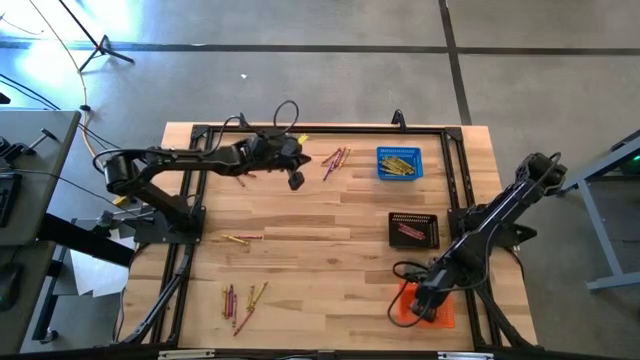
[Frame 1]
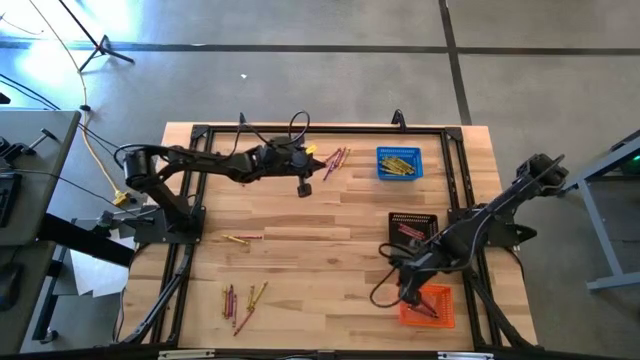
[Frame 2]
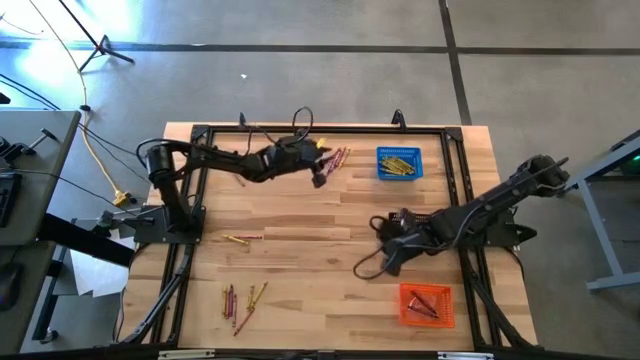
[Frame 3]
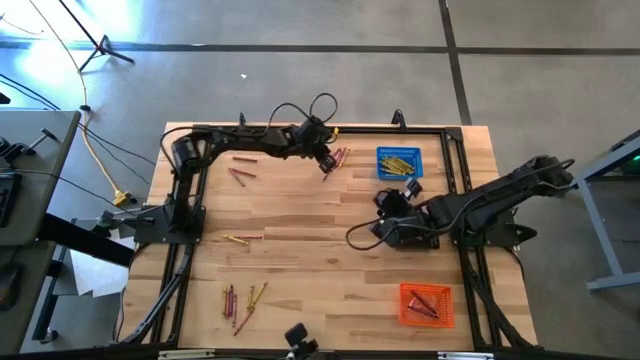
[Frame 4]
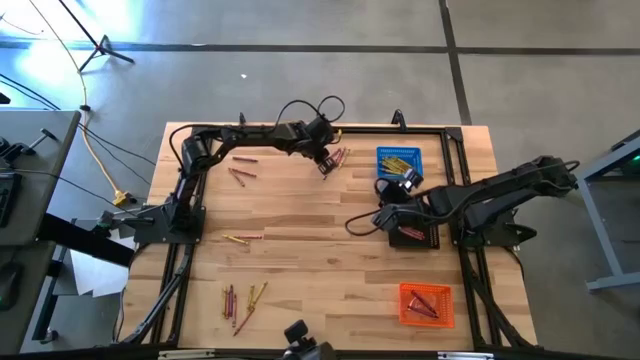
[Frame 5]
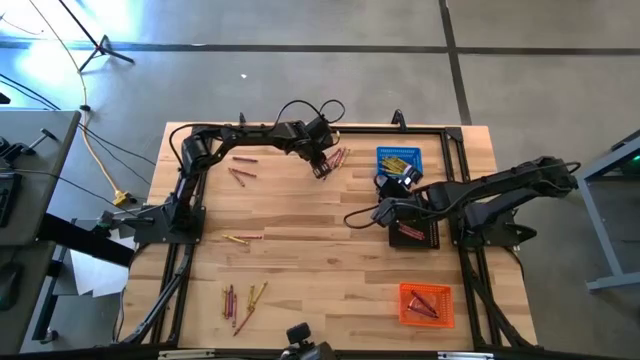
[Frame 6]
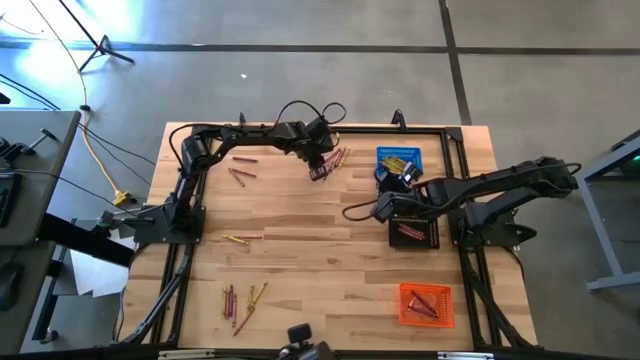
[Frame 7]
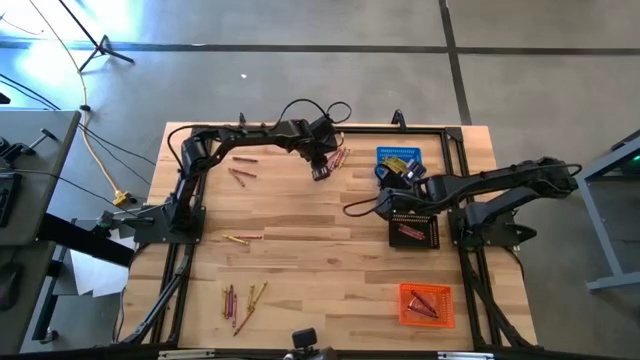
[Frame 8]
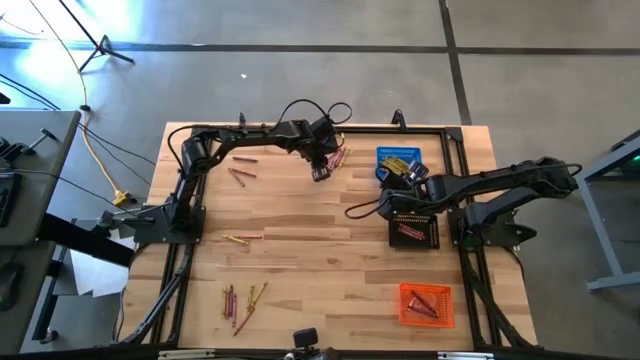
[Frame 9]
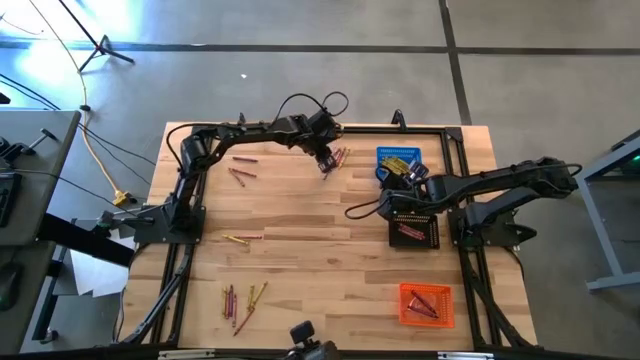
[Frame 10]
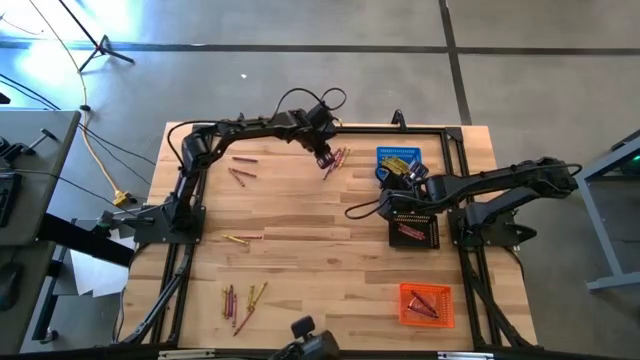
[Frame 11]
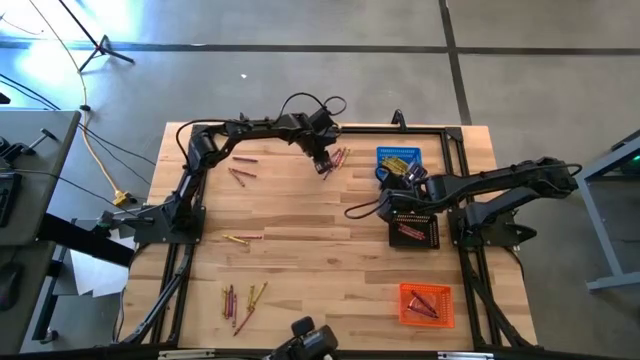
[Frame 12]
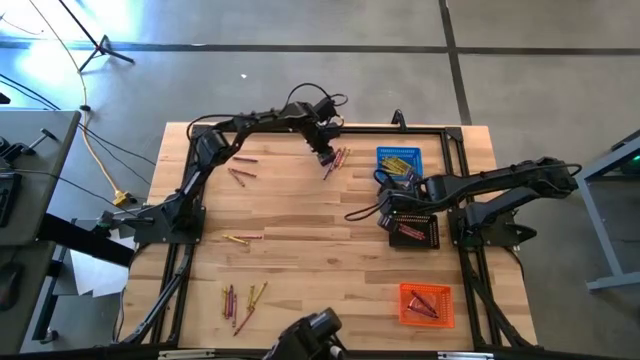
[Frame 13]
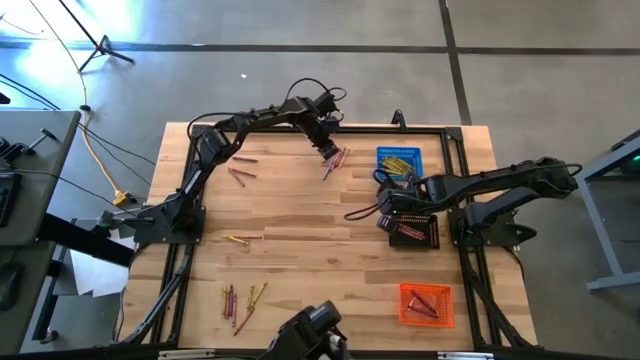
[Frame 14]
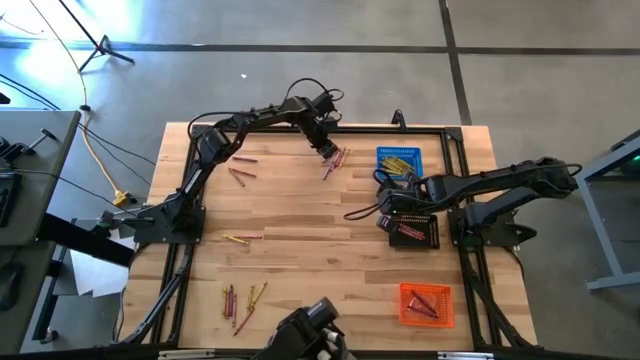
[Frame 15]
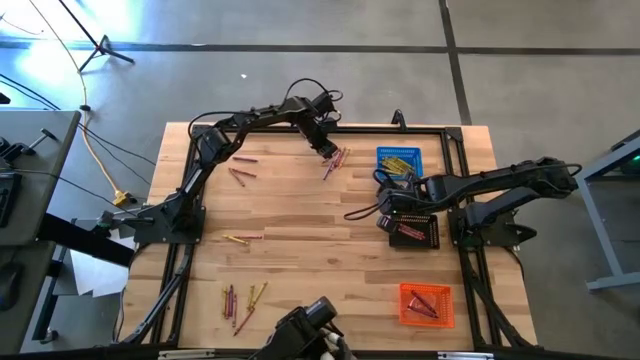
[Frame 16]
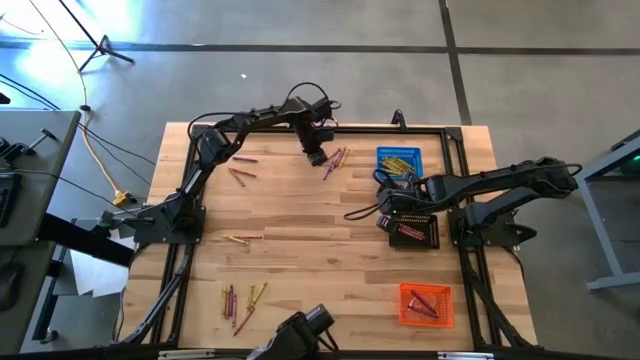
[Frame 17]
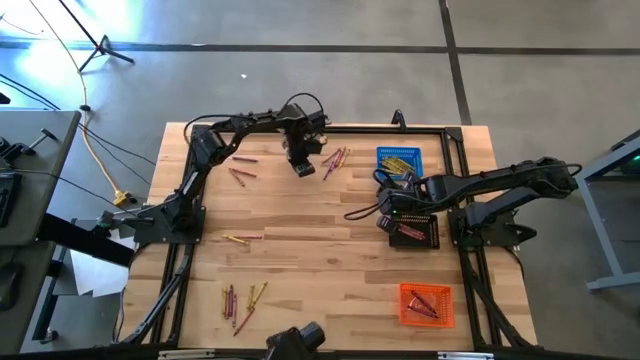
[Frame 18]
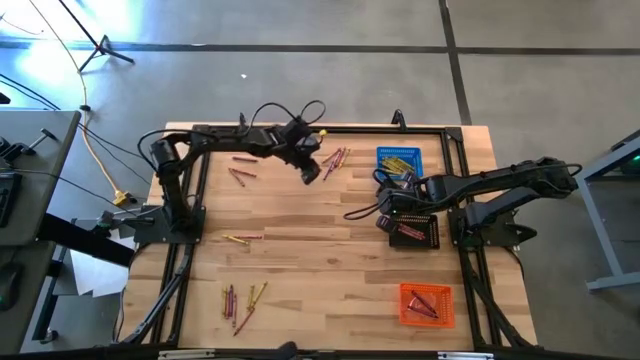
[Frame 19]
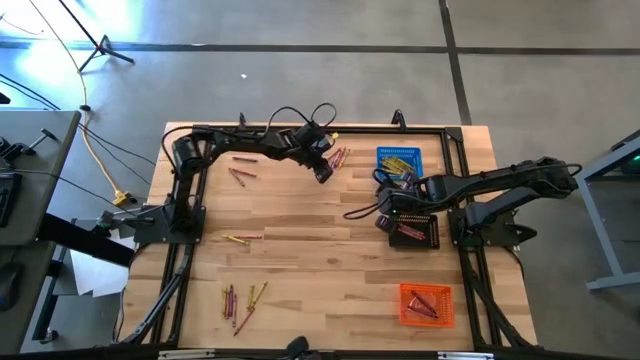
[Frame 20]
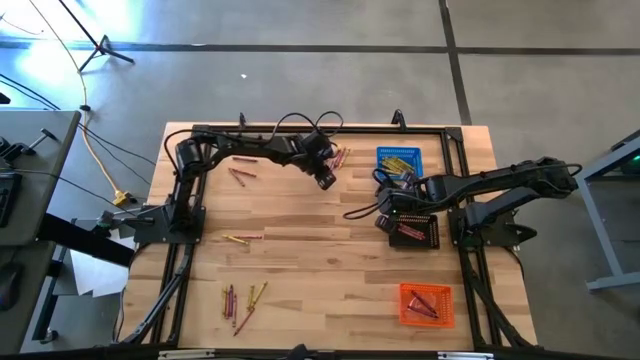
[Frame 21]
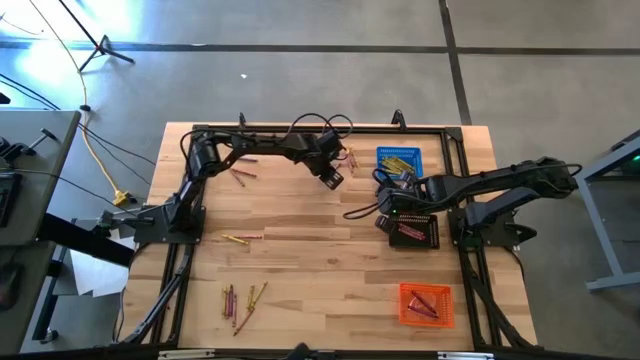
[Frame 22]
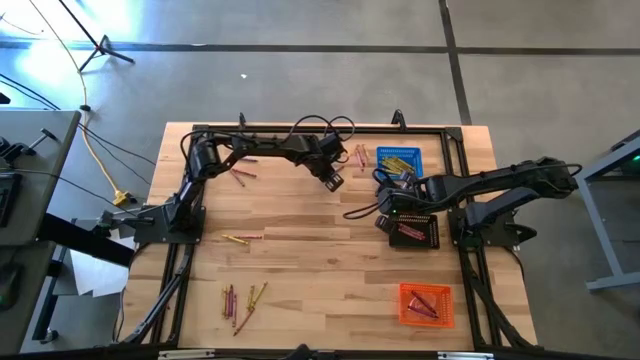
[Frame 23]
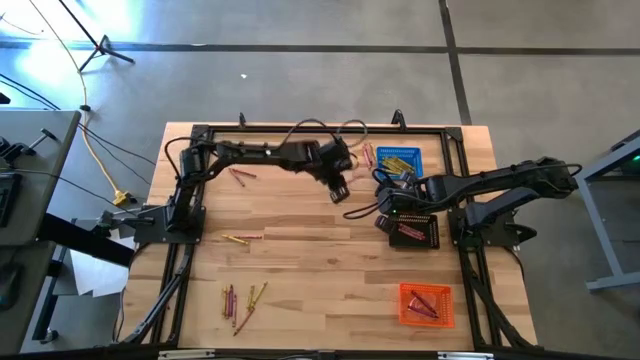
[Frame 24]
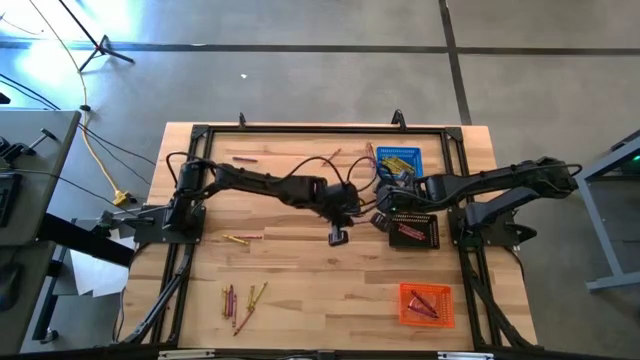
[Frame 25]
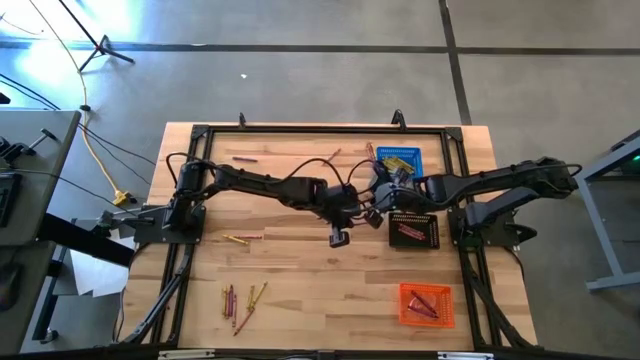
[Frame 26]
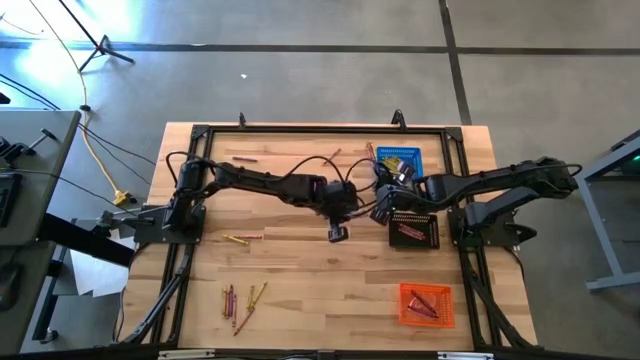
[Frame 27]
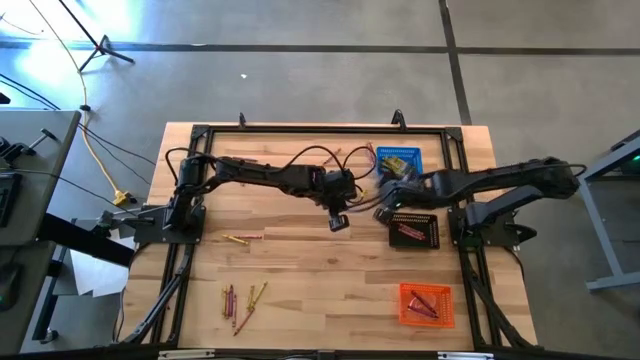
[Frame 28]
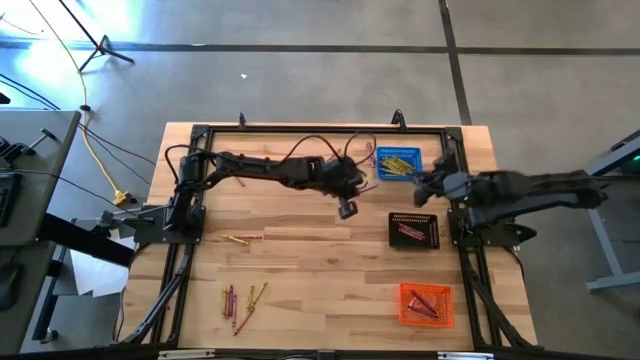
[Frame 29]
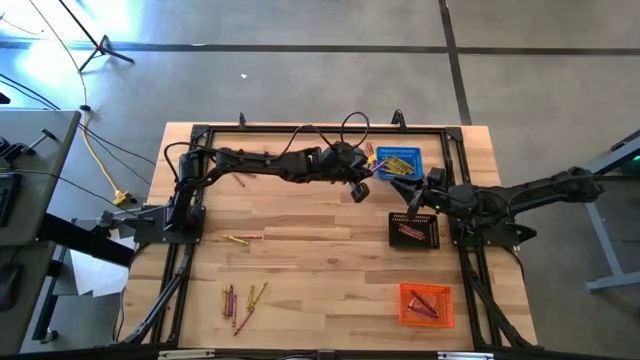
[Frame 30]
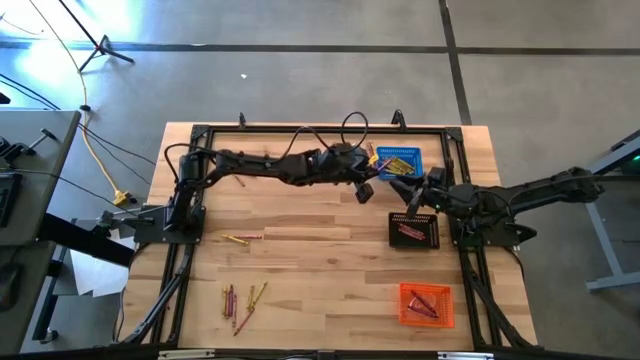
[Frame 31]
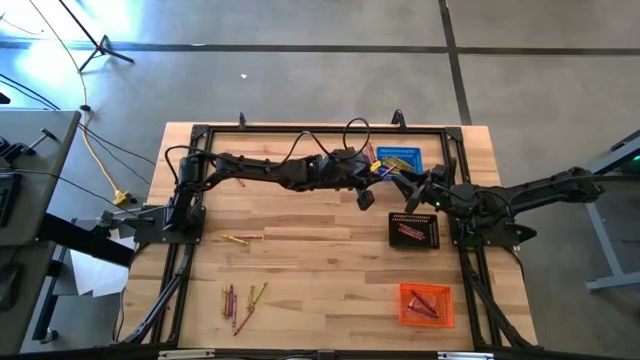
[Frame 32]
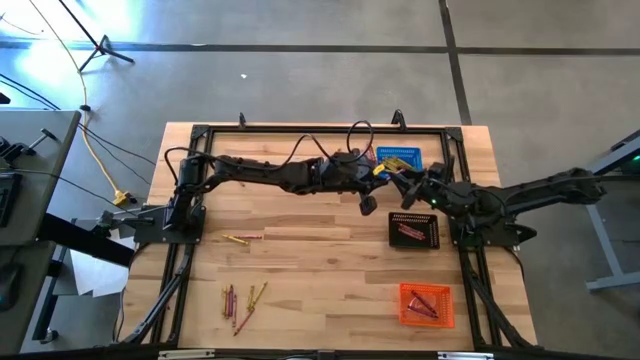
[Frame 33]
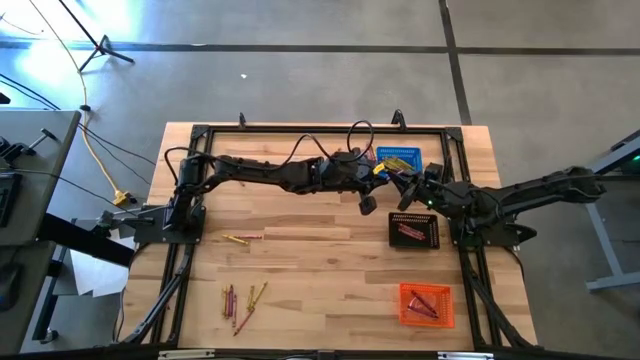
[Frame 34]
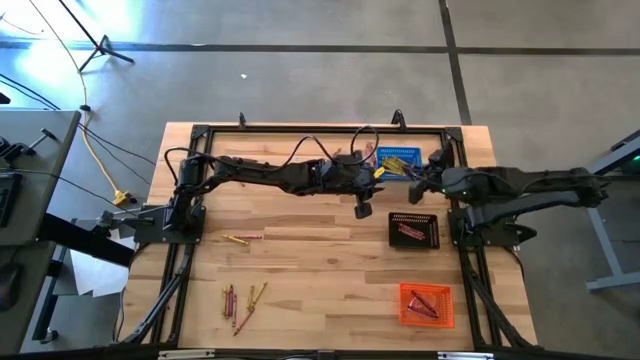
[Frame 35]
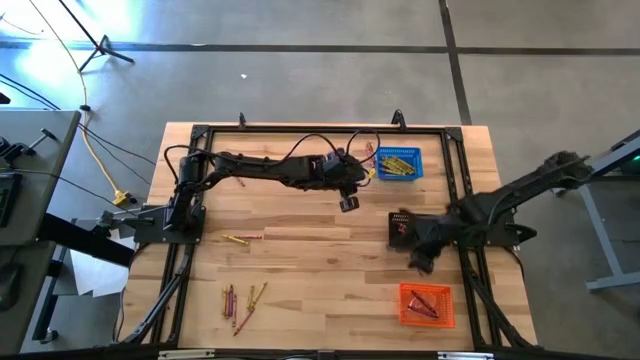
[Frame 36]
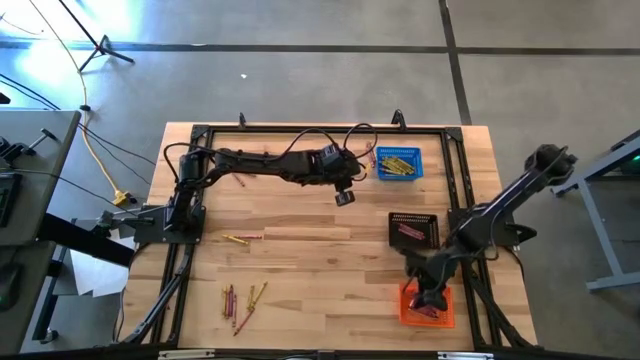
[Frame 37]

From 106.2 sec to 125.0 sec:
Task: Sort crayons
Put the violet crayon into the orange bin

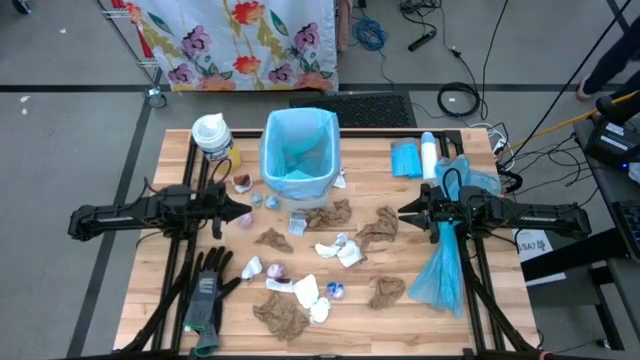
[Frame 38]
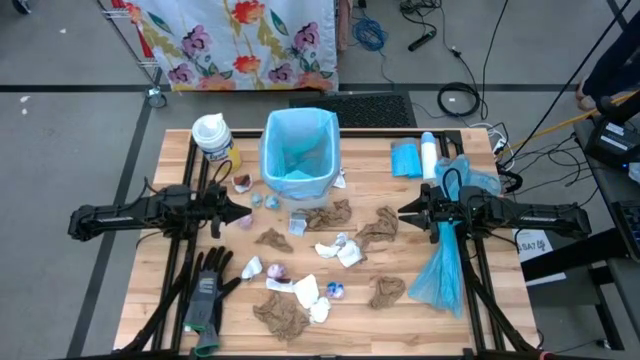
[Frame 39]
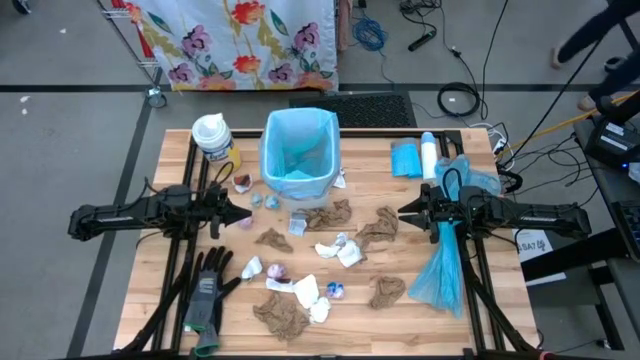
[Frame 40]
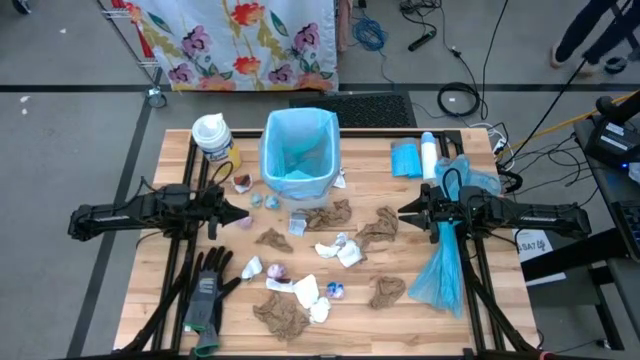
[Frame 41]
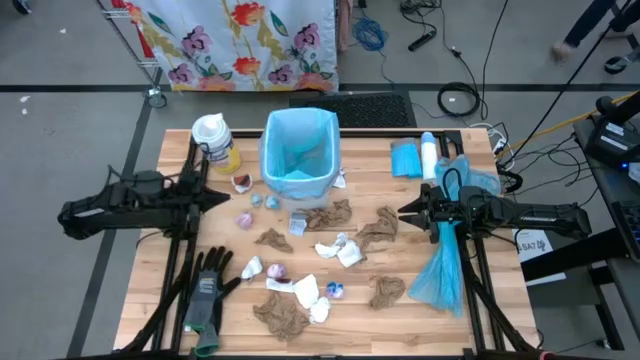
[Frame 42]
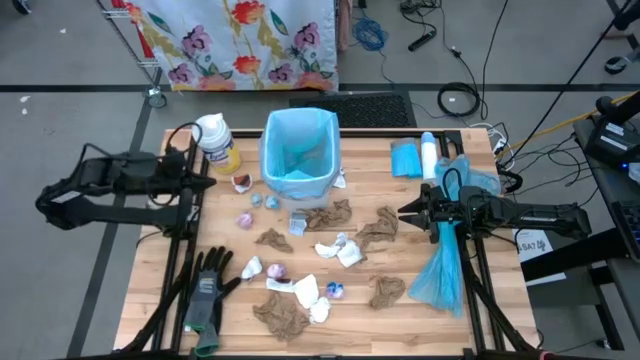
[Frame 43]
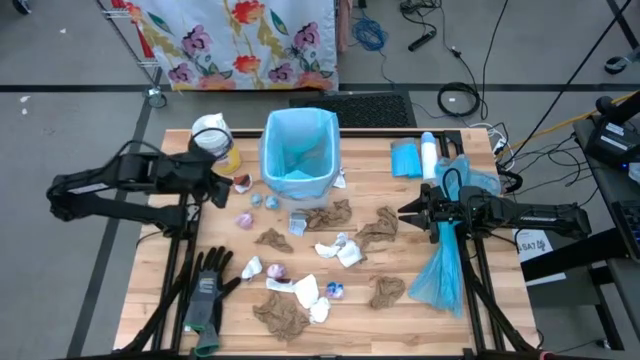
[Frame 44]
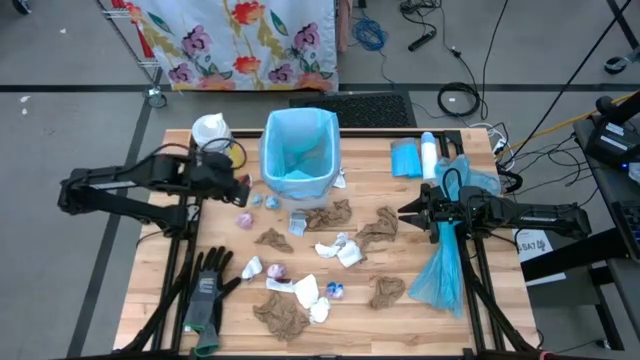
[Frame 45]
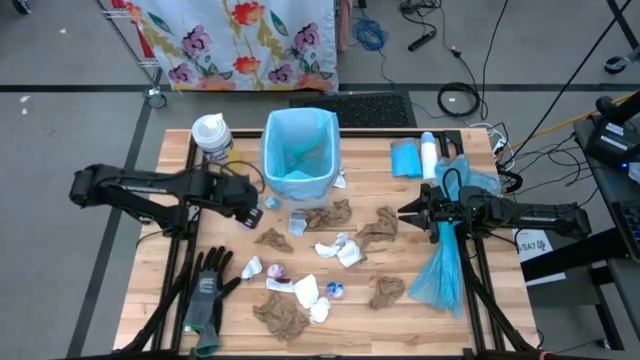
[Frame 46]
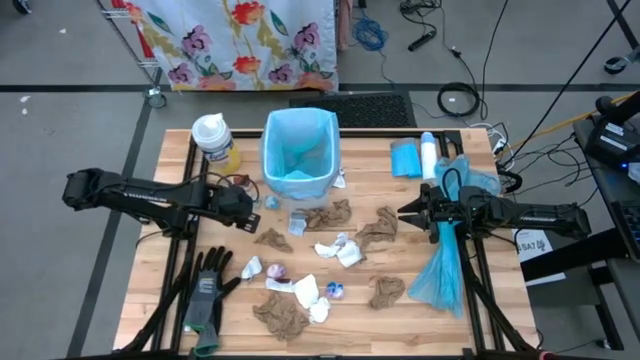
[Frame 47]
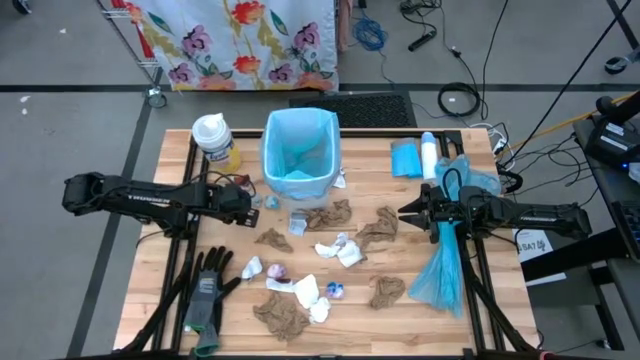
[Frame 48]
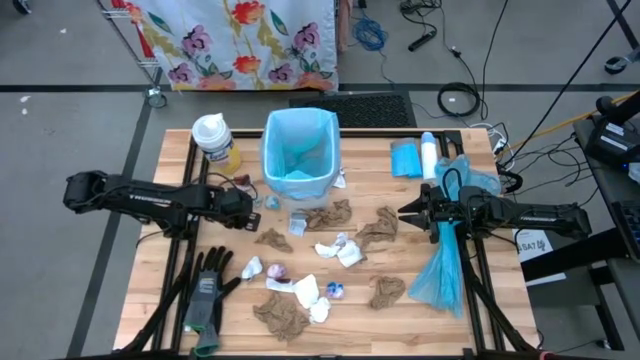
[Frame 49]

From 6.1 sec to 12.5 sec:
Task: place trash/remove bag and relplace
Put the pink plastic into the trash bin
